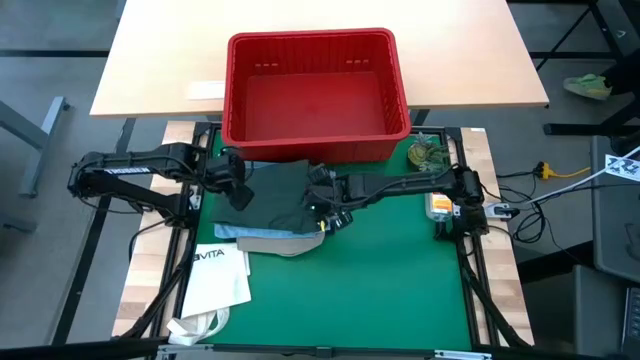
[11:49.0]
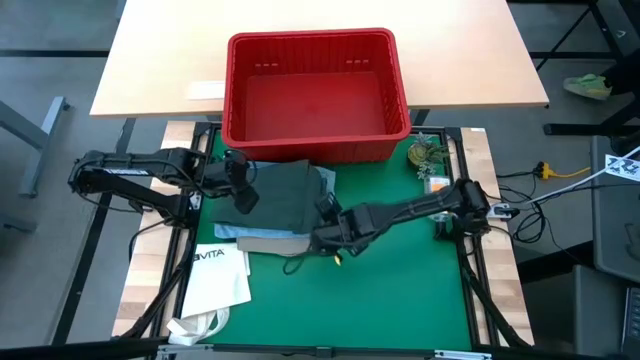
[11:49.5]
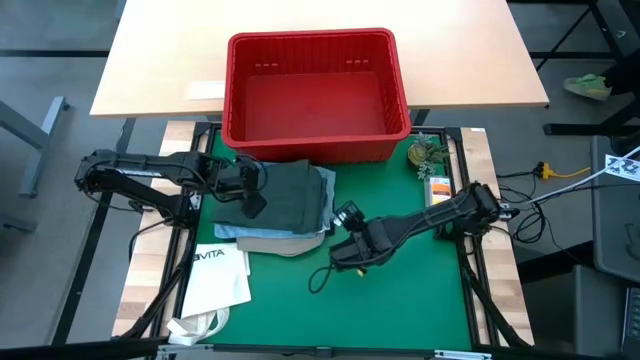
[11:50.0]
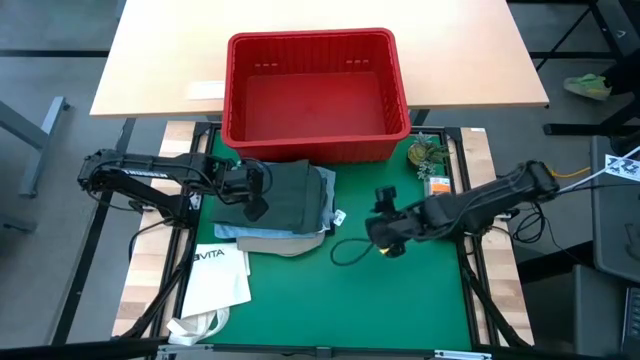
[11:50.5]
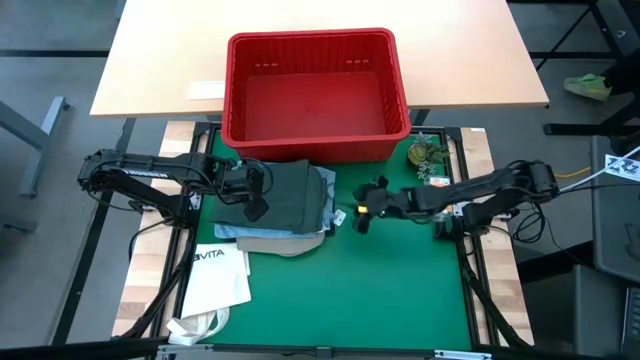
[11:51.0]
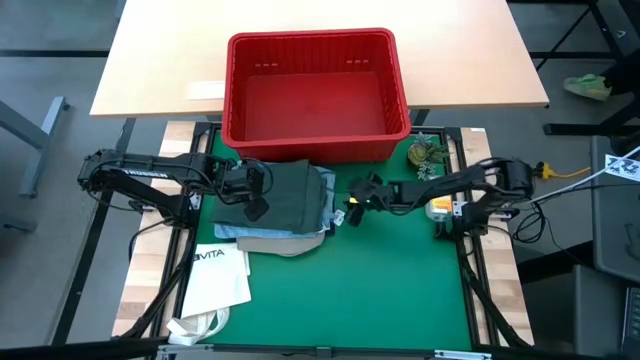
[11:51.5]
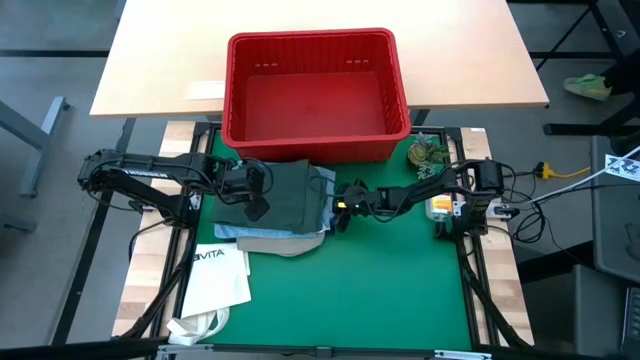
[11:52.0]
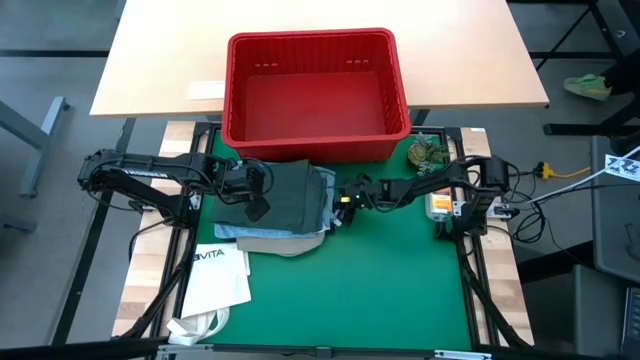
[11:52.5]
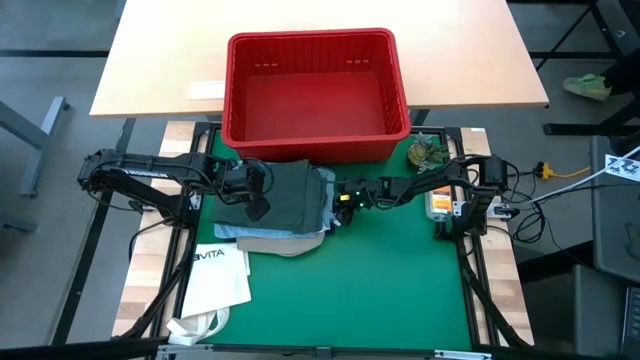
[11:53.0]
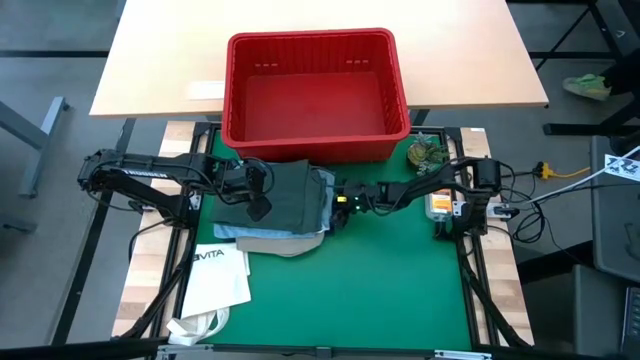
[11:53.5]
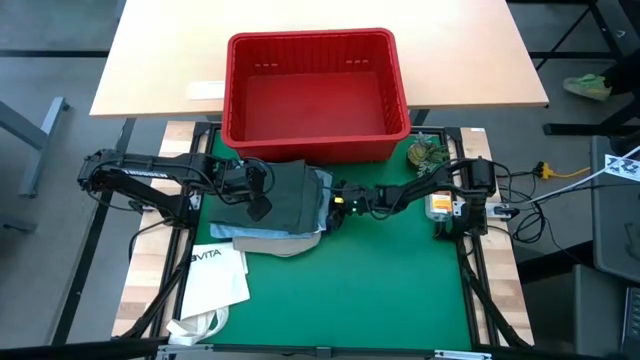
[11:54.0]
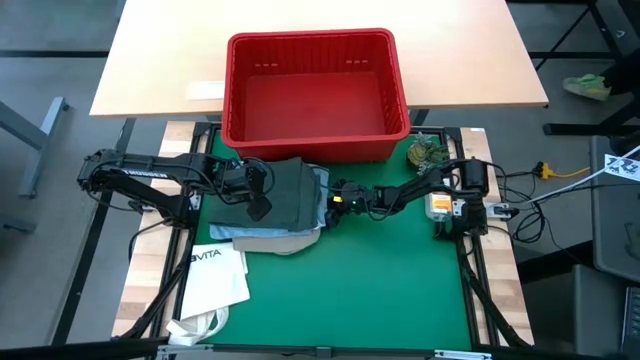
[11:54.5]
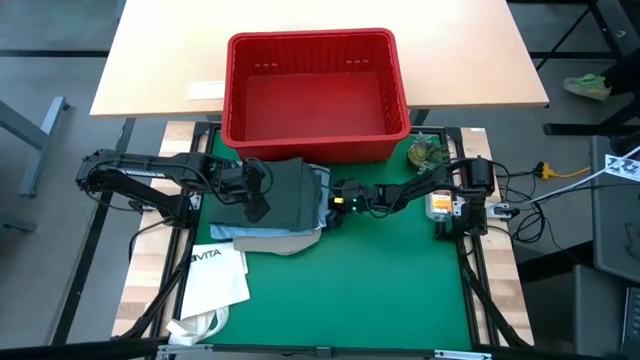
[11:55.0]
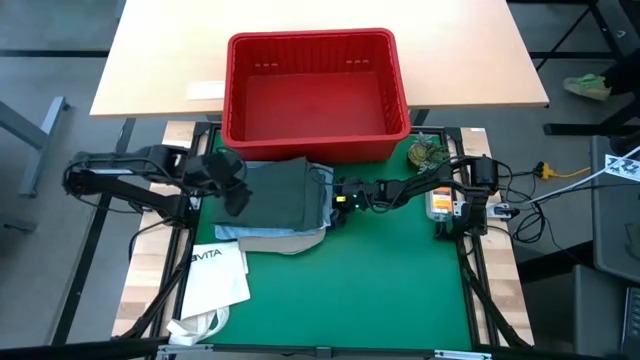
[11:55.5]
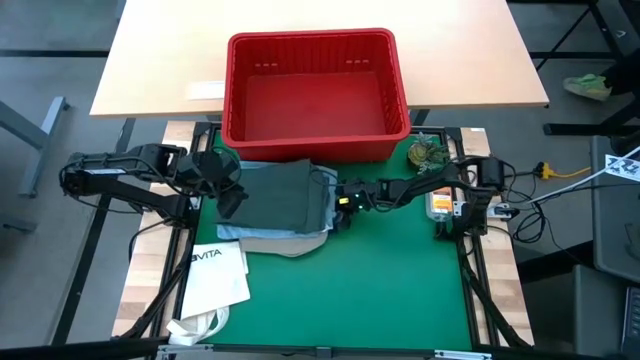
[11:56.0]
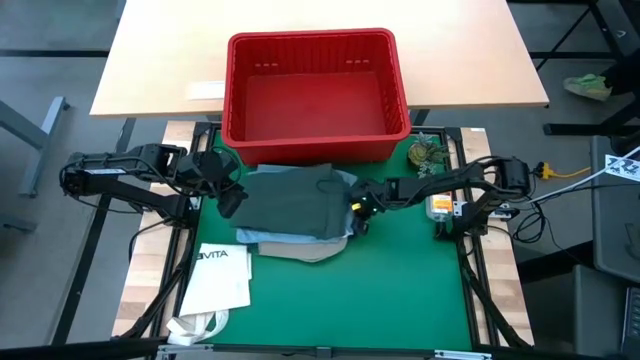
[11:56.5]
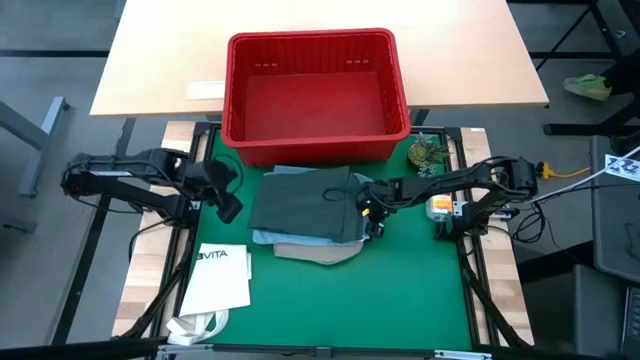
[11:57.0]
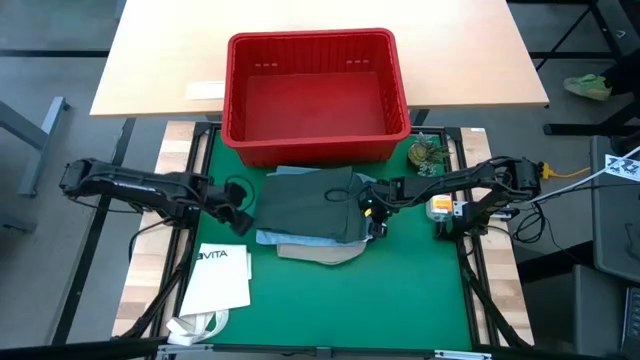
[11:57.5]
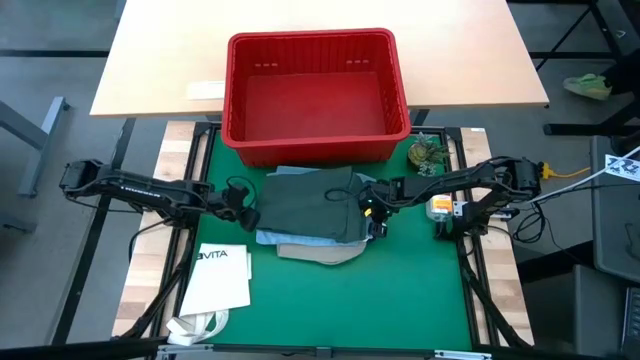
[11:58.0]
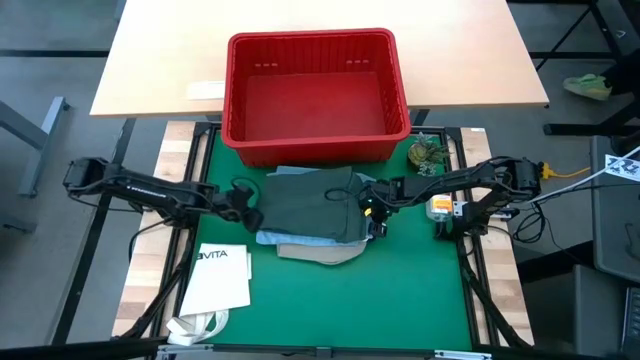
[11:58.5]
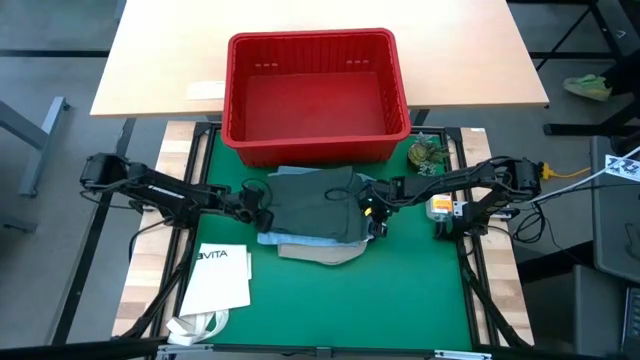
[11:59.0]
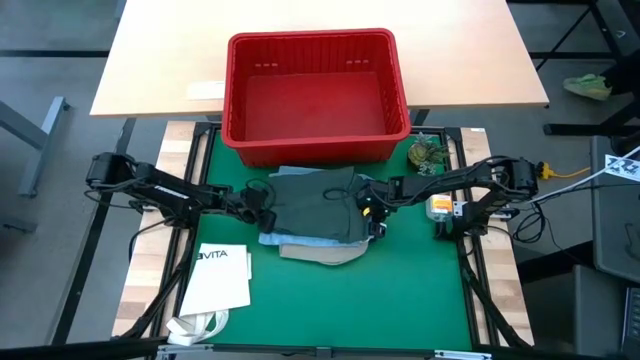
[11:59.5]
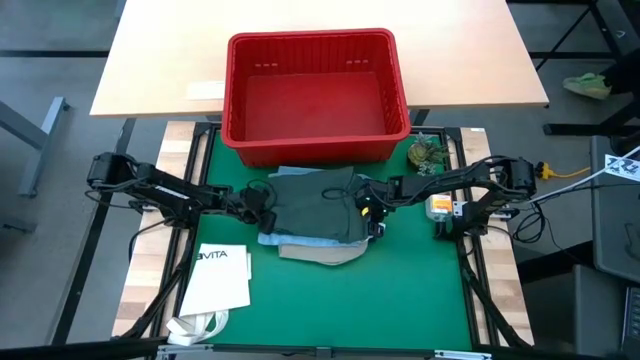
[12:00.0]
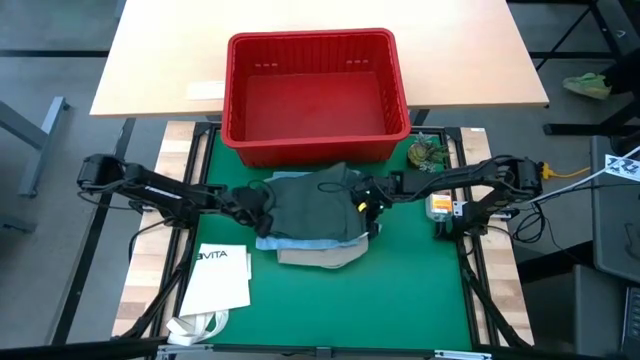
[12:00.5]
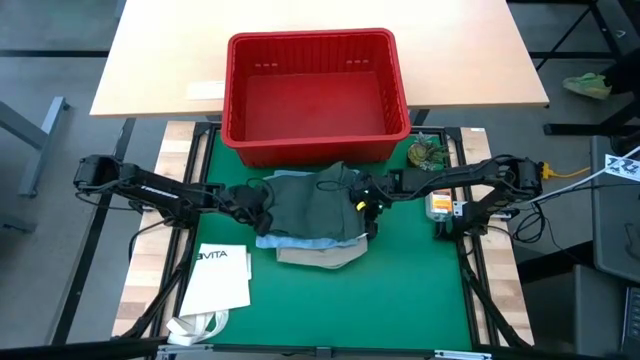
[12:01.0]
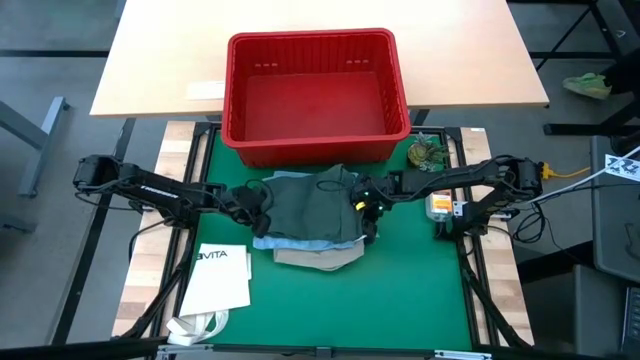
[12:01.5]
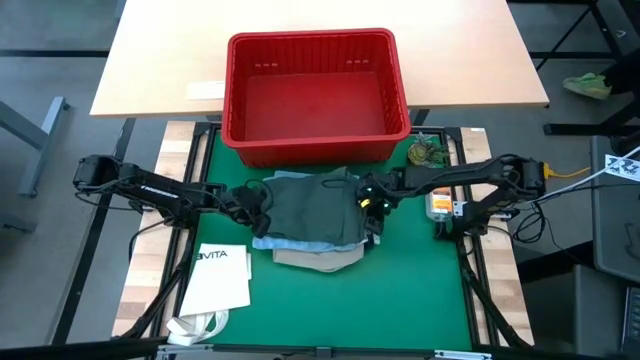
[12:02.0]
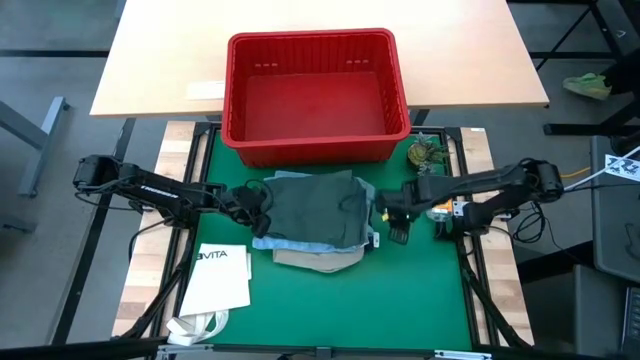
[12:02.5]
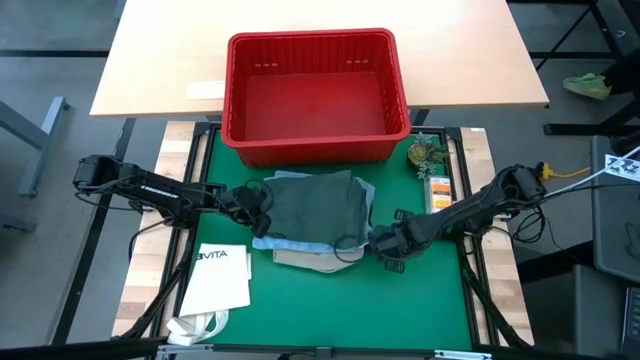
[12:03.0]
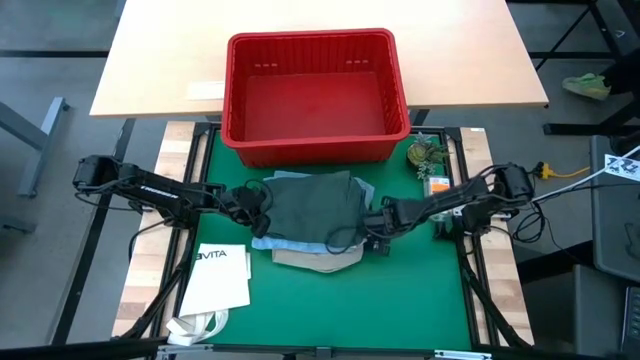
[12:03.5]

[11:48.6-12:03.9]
Task: Fold Laundry from Bin
Put the stack of folded clothes into the red bin

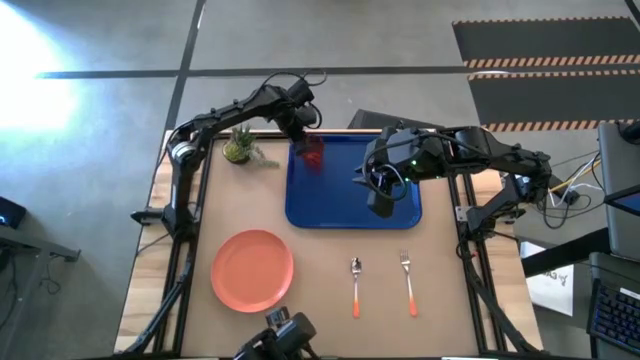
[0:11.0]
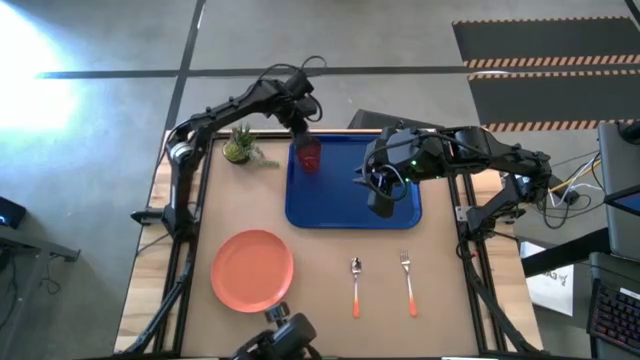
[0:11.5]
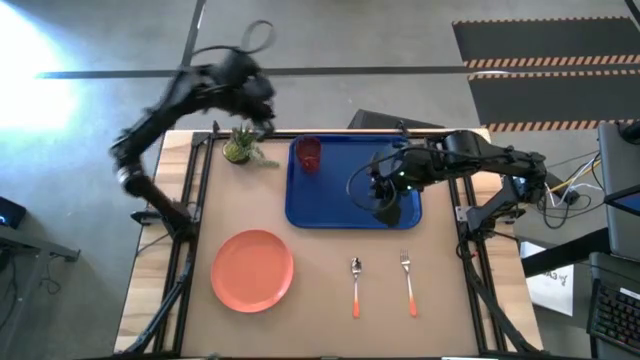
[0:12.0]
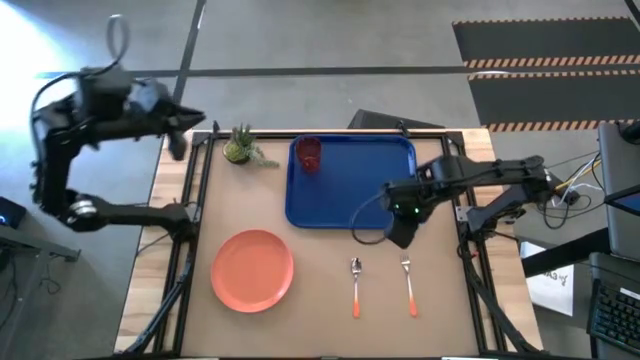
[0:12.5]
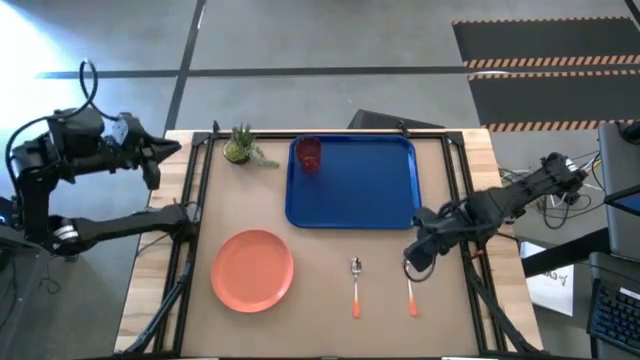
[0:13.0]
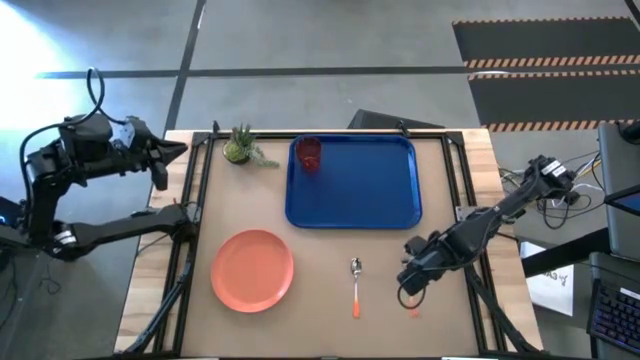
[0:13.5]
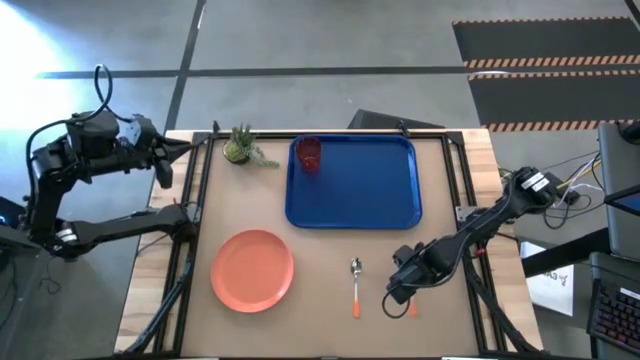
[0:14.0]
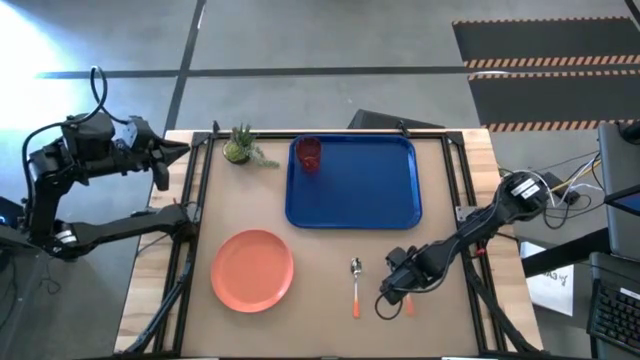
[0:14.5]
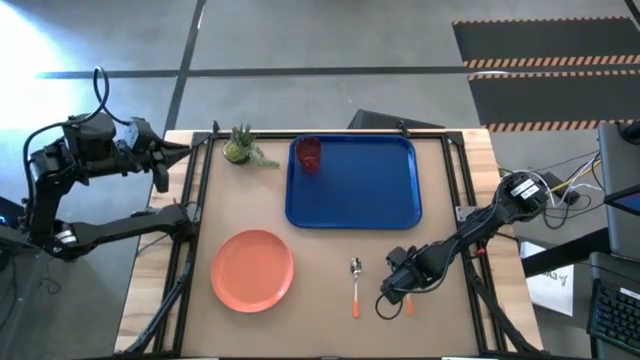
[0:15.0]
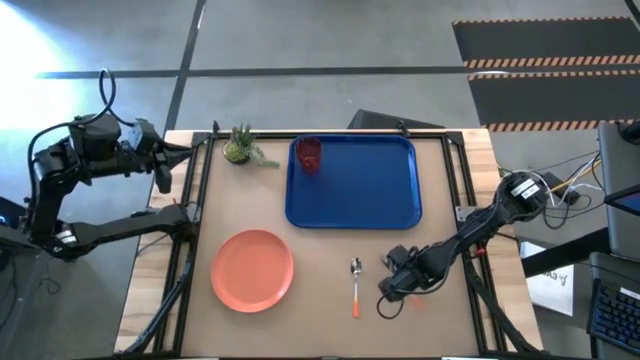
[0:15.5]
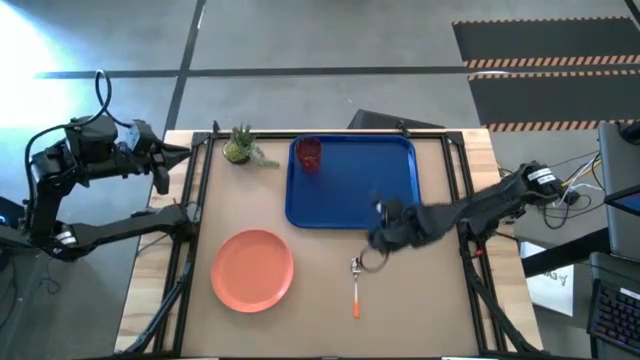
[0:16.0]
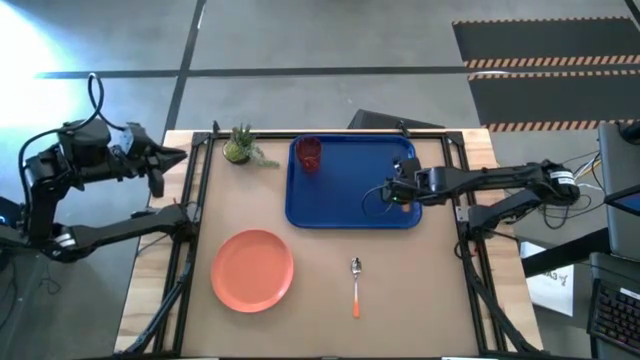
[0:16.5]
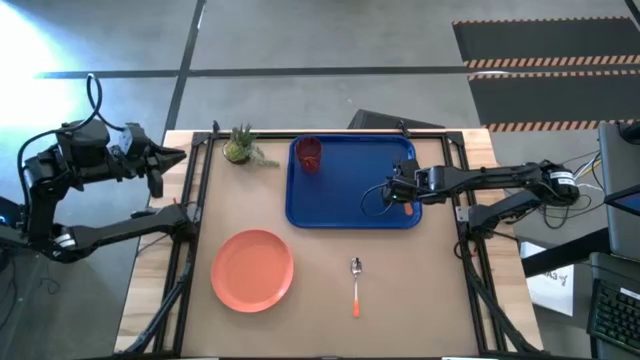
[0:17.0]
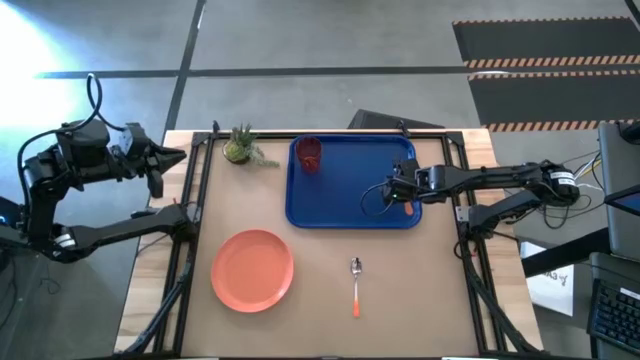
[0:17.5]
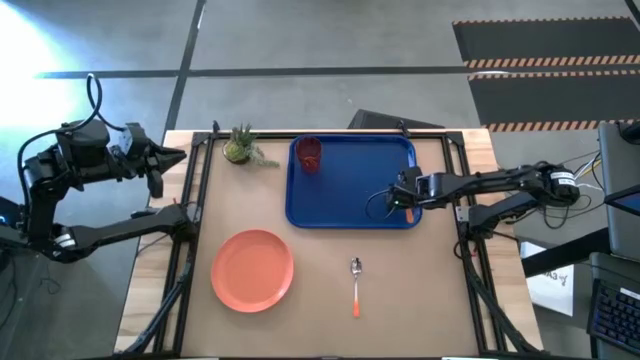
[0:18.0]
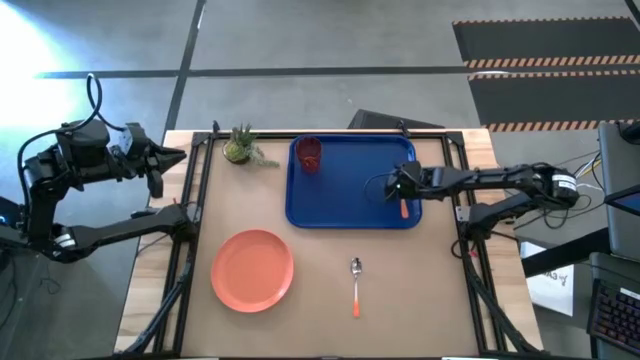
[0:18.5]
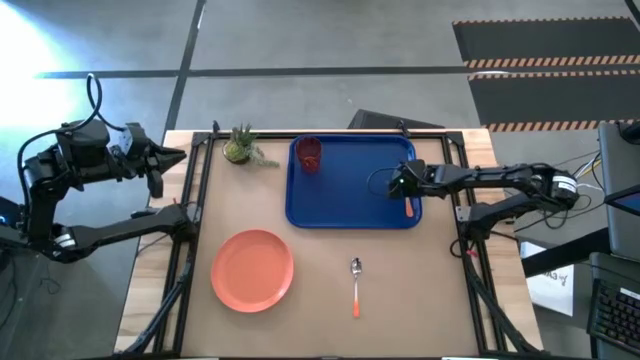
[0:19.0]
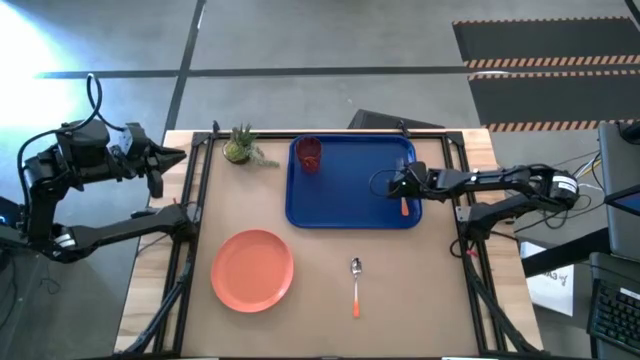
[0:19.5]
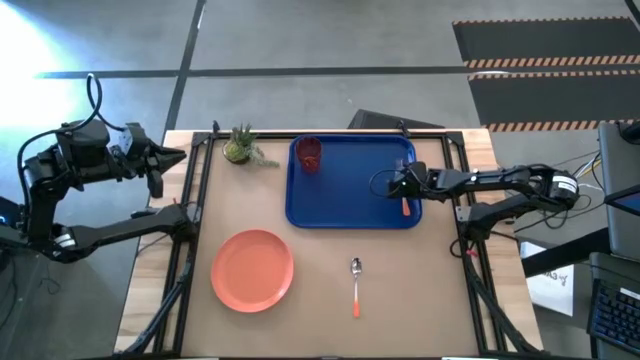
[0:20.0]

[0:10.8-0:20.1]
Task: Pick and place plate/cup/fork/spoon on tray
Put the fork on the right side of the serving tray
